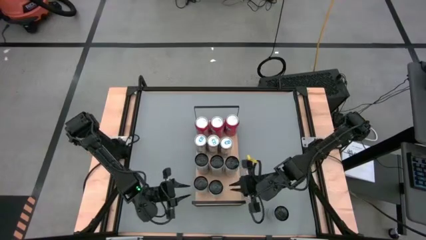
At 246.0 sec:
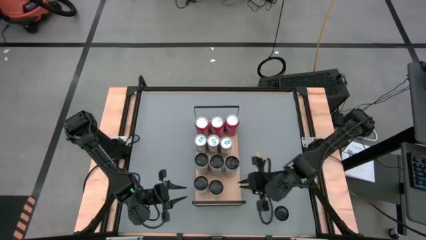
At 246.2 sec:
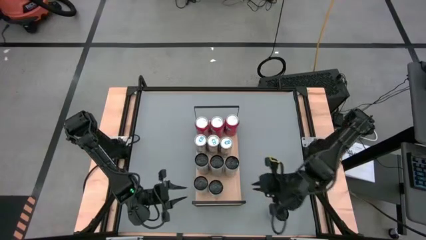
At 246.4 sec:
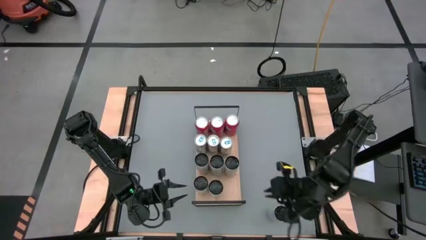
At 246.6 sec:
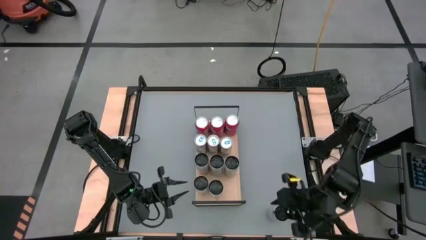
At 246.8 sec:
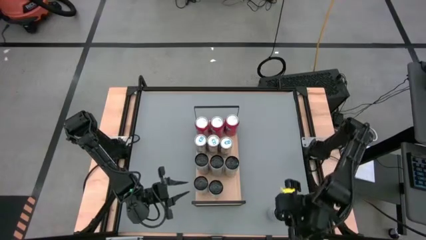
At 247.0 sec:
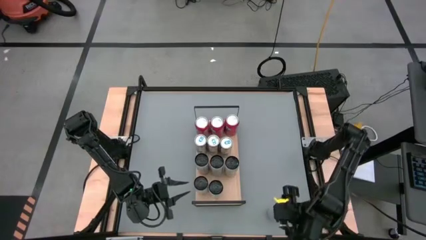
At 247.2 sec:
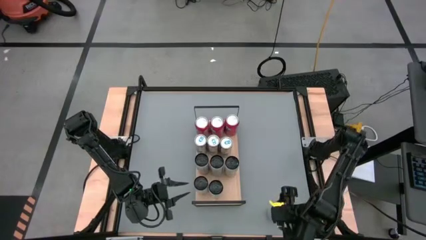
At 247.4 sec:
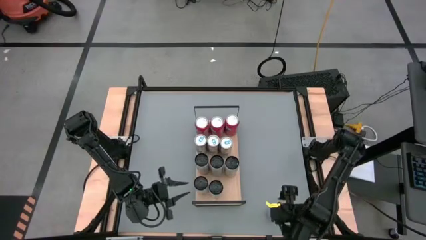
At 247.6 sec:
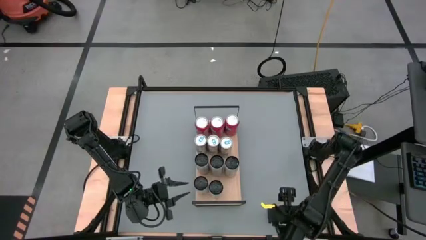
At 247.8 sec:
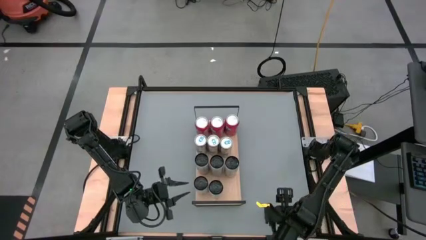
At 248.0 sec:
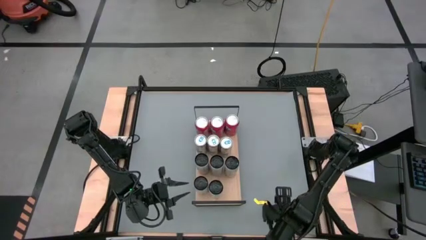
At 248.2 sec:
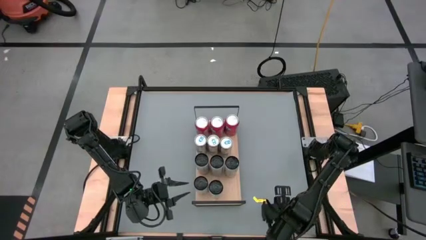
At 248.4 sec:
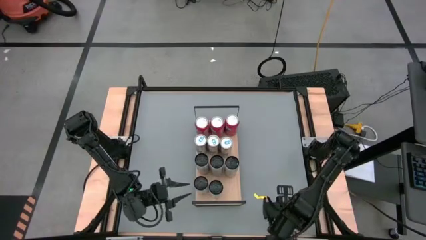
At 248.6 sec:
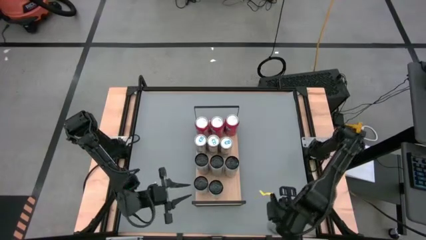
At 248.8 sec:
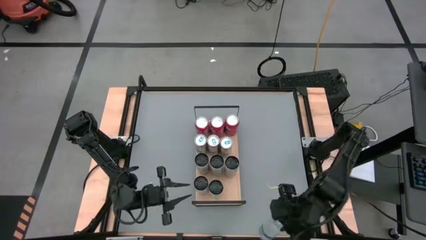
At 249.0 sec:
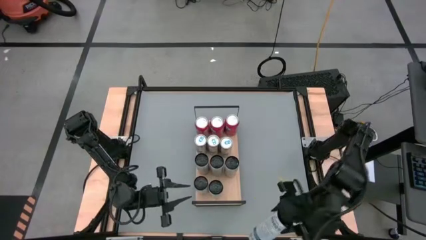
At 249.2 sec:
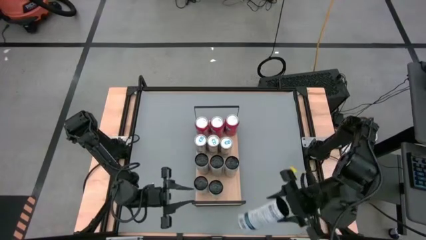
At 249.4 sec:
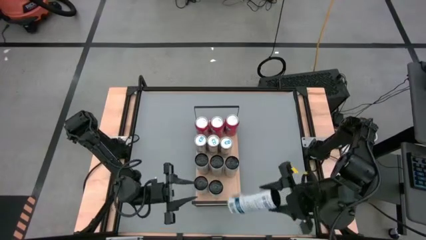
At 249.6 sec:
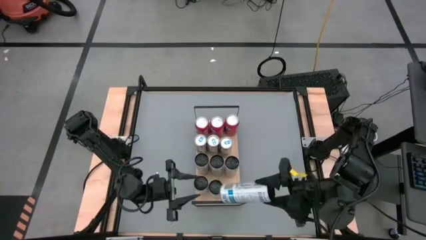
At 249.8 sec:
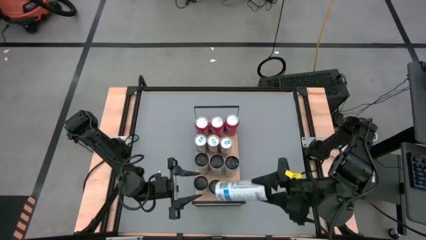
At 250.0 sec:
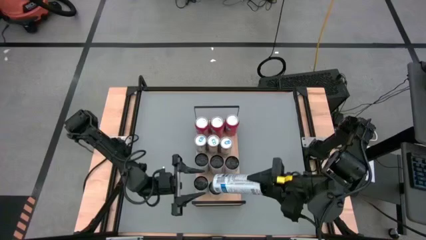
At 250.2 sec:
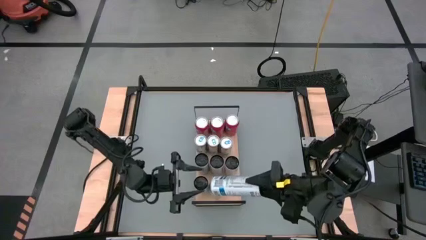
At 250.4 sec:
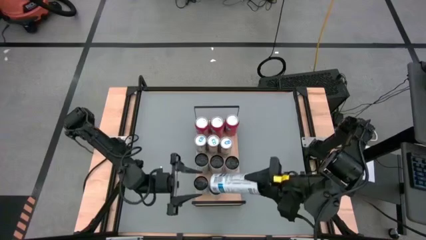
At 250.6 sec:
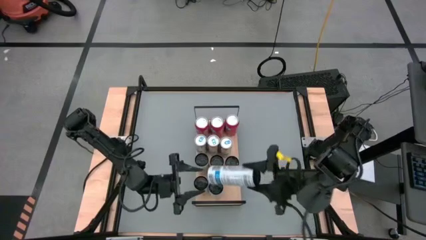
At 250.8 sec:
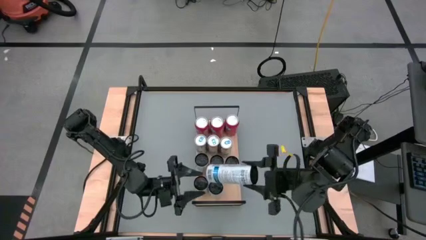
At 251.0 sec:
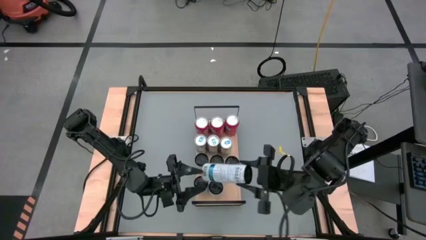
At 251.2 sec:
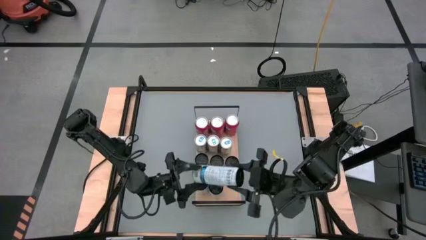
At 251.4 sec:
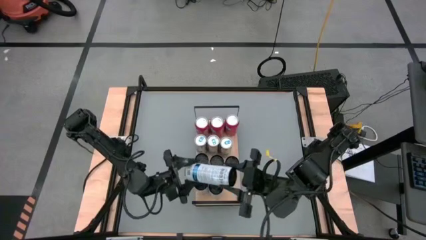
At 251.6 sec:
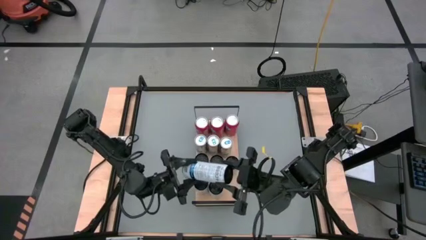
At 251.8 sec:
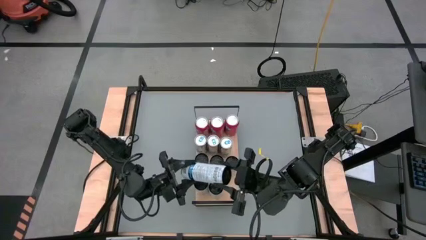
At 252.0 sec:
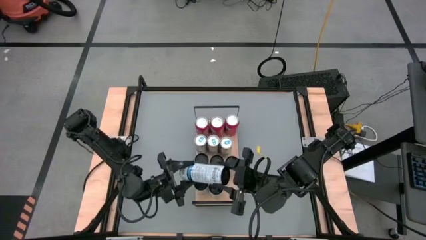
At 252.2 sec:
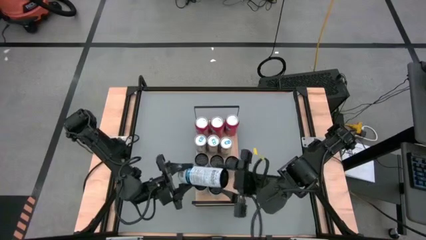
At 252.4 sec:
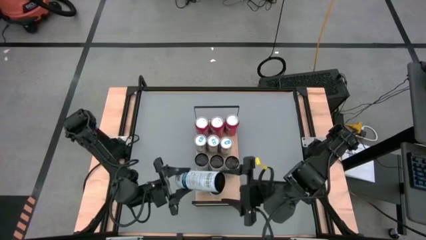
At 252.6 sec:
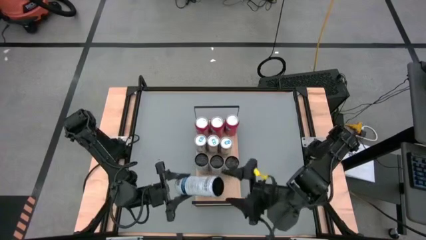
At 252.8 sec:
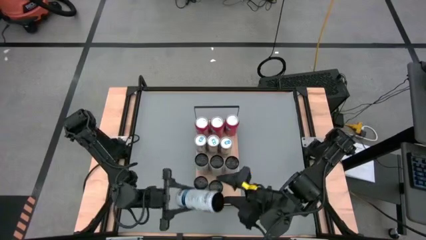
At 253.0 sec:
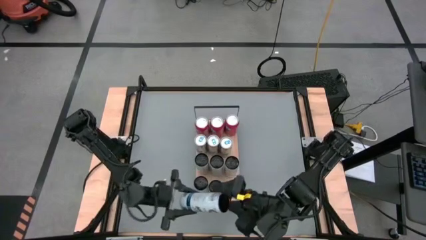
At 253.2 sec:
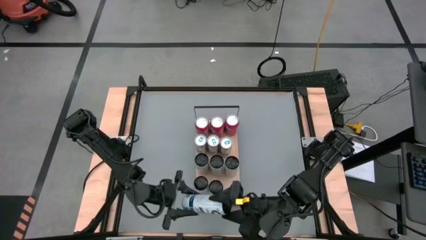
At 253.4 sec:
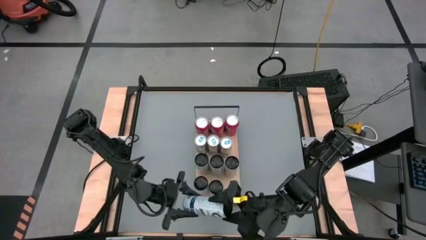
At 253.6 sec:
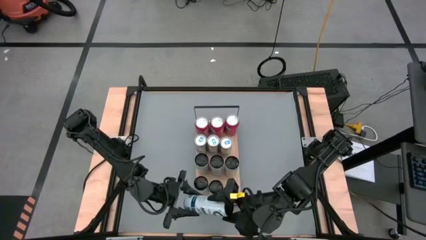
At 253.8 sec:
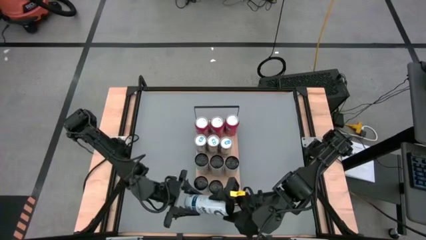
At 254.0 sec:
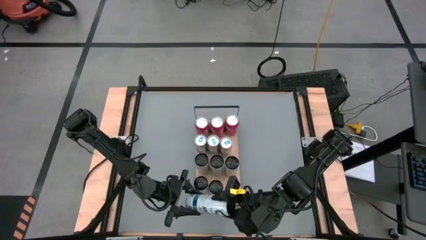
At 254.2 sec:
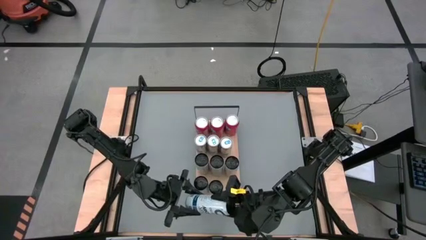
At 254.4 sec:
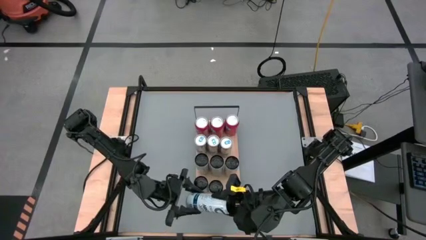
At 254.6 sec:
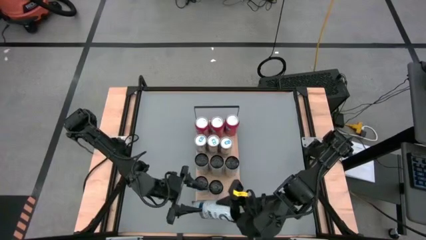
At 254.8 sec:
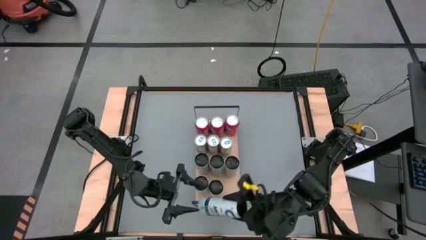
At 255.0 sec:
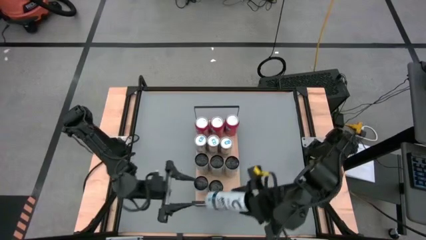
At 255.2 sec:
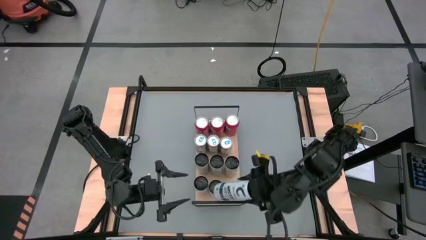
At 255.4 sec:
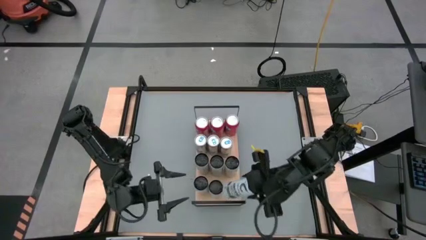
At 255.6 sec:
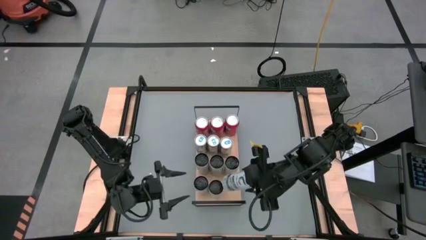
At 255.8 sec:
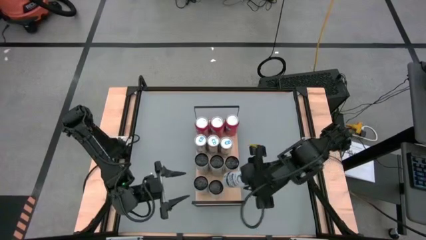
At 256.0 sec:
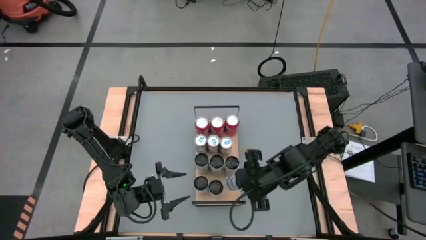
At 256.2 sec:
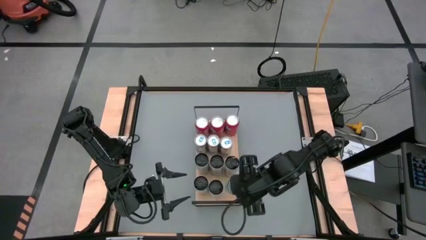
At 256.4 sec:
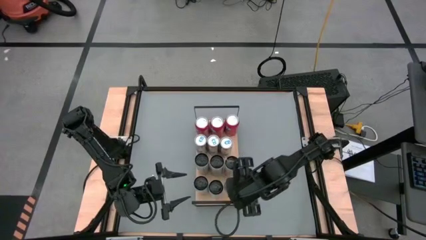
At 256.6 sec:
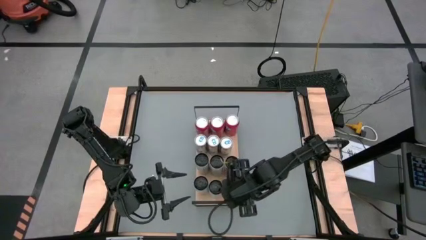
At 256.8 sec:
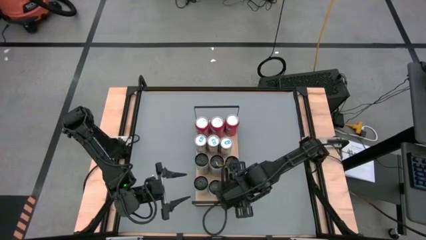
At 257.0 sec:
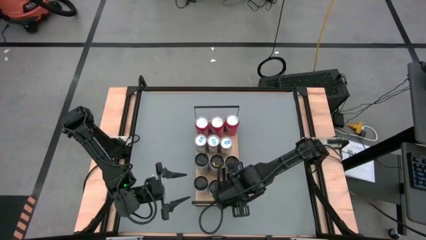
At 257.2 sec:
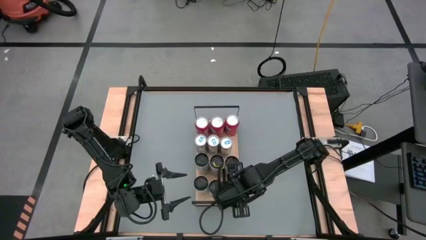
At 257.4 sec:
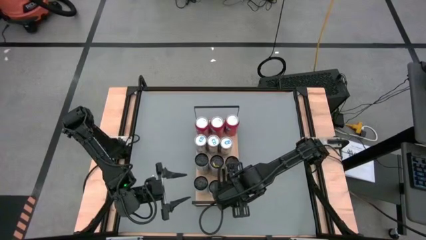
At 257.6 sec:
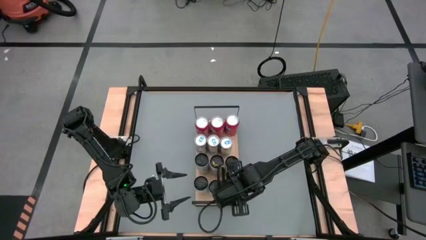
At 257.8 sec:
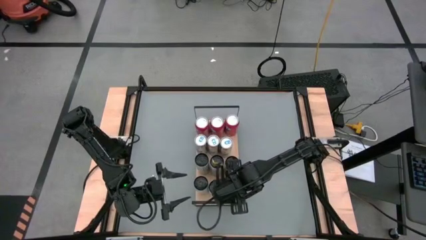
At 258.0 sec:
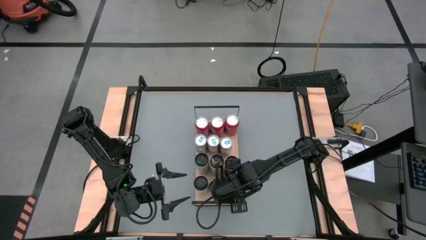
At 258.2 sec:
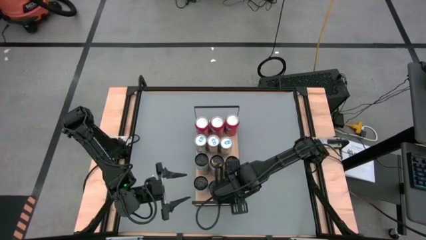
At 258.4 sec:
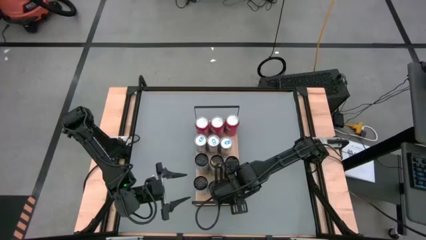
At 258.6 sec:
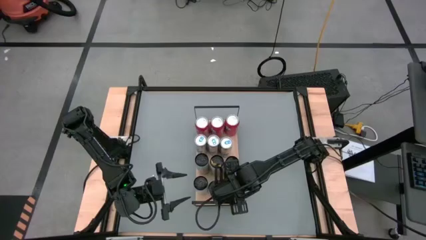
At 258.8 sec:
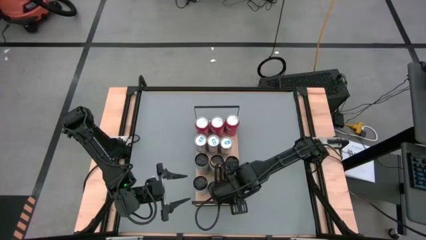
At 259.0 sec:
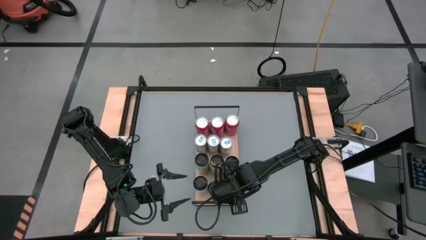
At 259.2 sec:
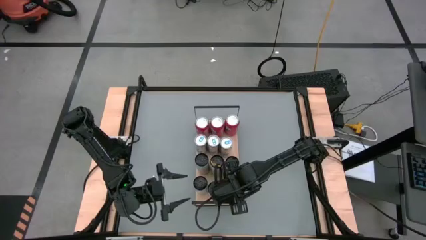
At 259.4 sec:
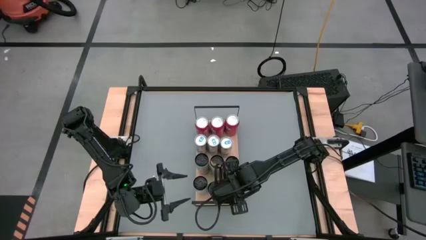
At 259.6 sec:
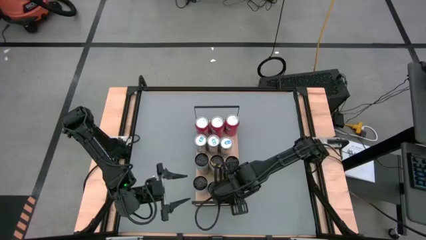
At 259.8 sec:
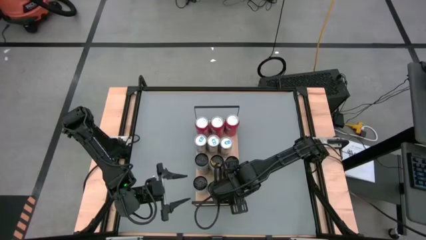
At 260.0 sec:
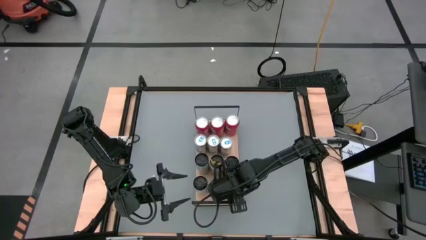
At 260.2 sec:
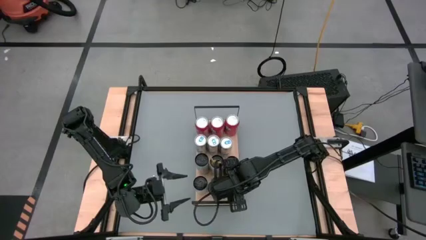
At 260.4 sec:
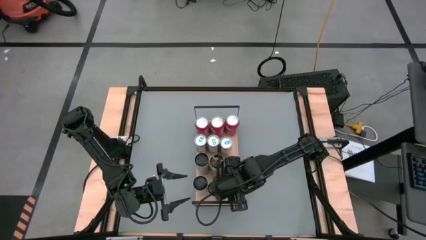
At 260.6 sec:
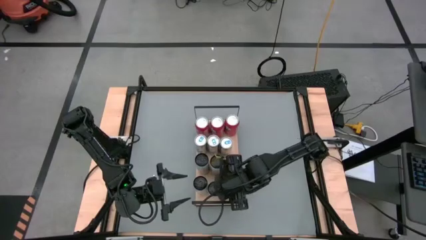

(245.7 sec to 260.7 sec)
Task: Place canned beverage on shelf
Put the white-blue soda can aligned with the other white-blue soda cans on the shelf

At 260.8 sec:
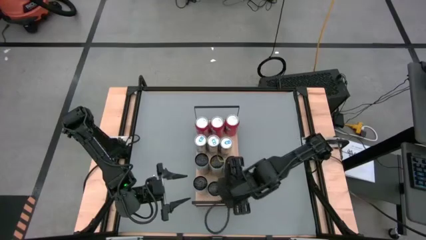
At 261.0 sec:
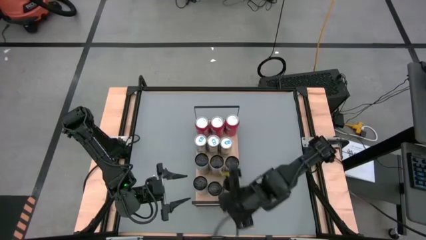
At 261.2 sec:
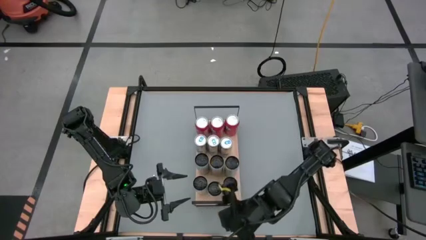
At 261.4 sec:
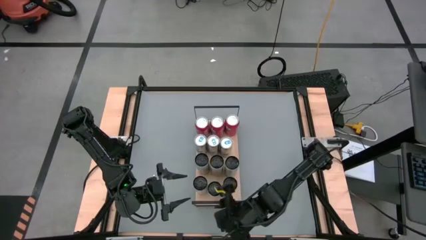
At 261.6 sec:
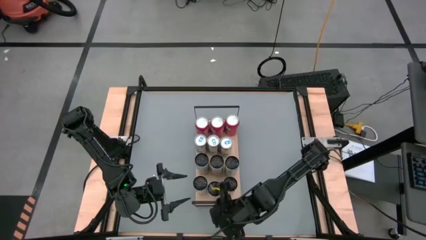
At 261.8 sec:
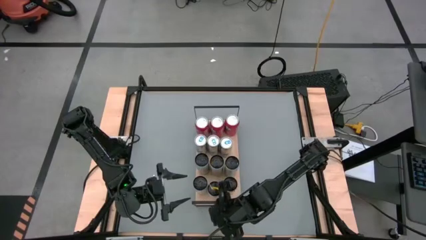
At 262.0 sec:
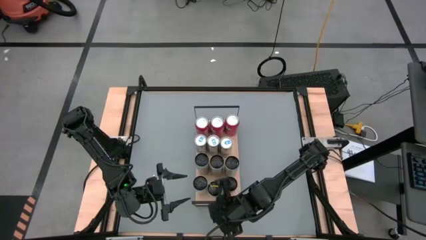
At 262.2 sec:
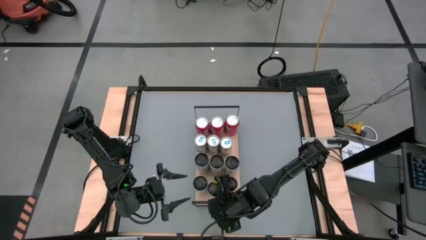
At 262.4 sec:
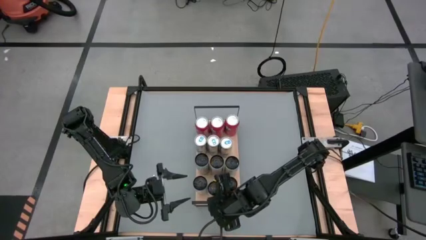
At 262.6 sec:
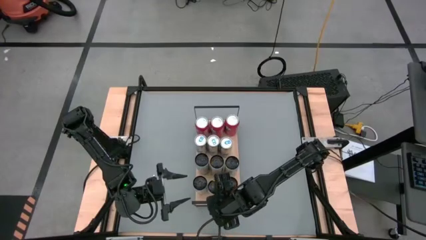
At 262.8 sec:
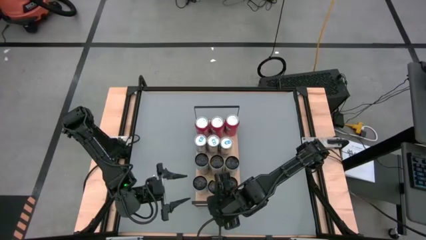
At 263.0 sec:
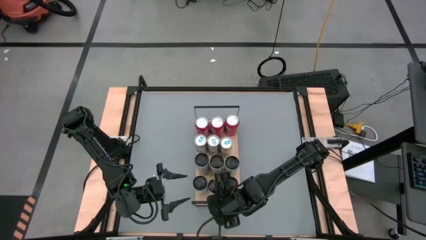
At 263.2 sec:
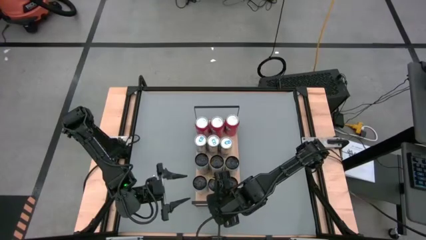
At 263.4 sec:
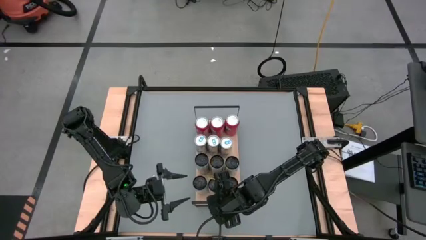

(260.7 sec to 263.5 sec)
Adjust the middle white-blue soda on the shelf
